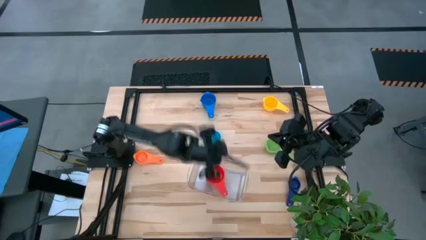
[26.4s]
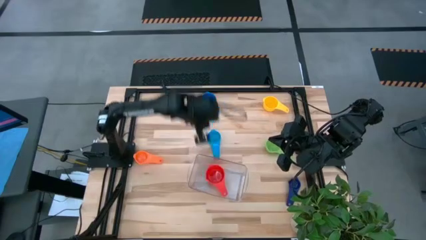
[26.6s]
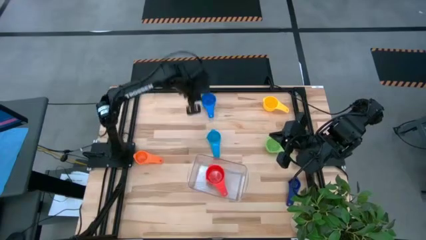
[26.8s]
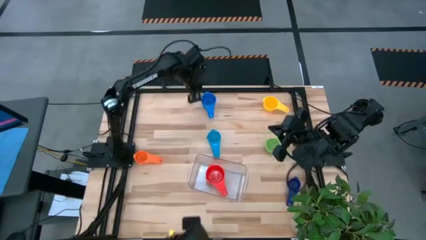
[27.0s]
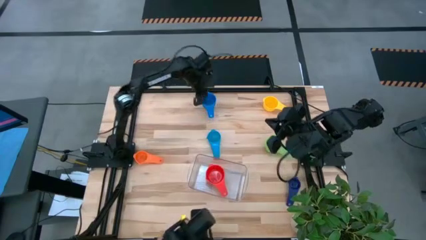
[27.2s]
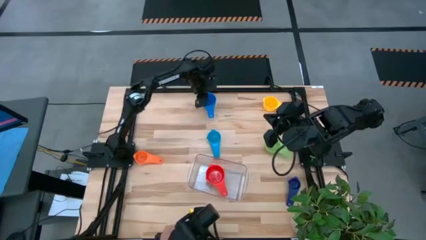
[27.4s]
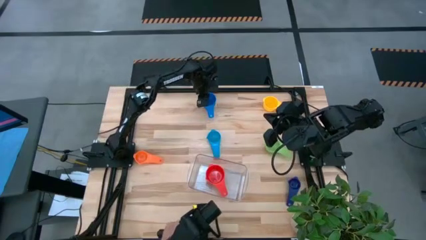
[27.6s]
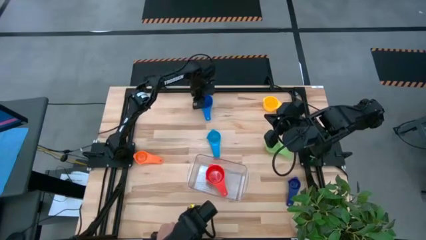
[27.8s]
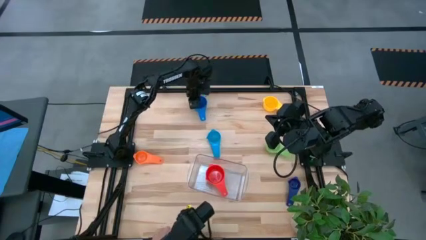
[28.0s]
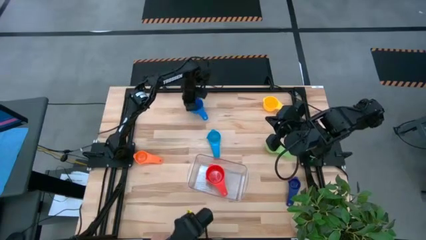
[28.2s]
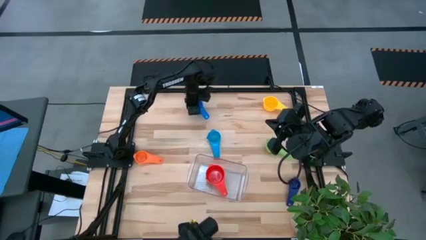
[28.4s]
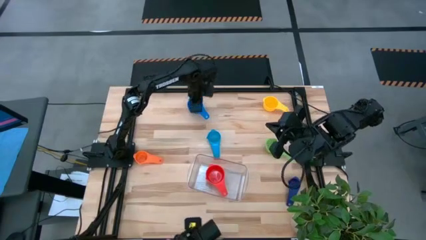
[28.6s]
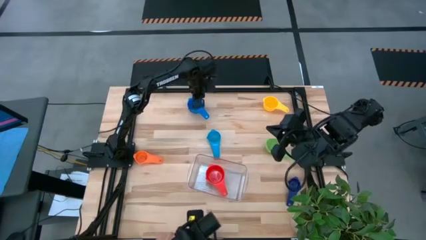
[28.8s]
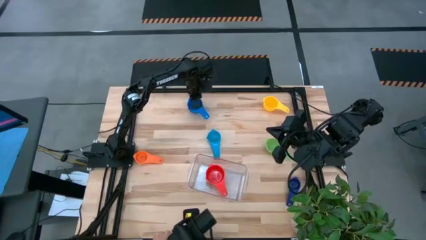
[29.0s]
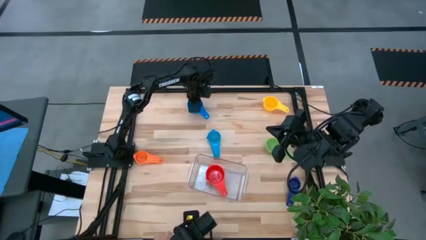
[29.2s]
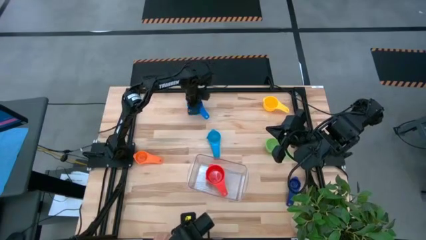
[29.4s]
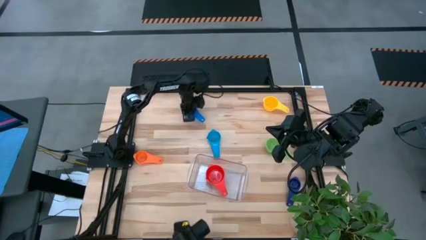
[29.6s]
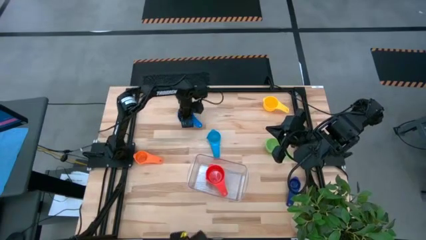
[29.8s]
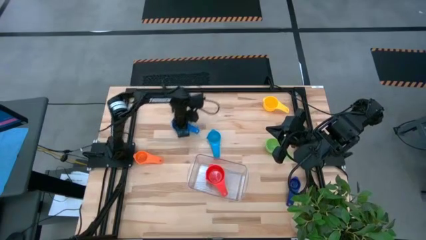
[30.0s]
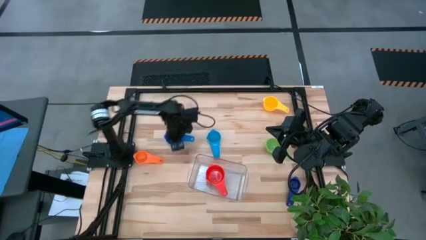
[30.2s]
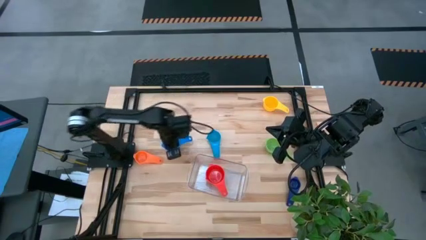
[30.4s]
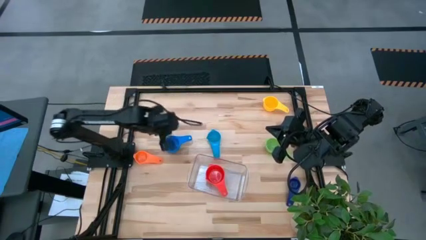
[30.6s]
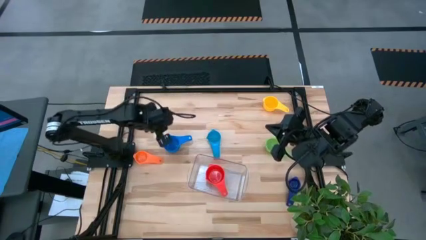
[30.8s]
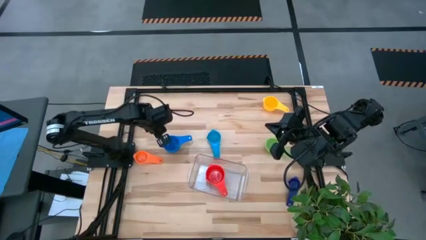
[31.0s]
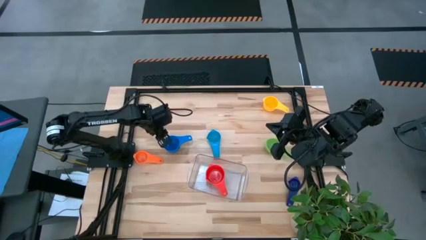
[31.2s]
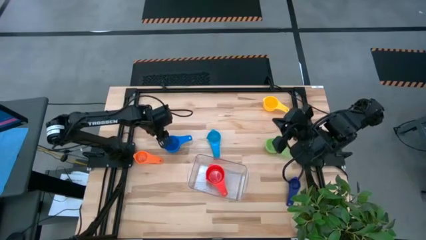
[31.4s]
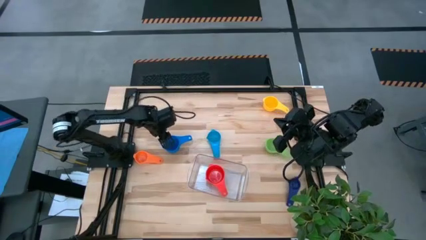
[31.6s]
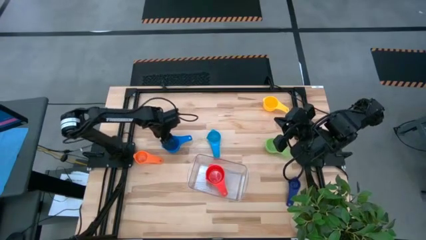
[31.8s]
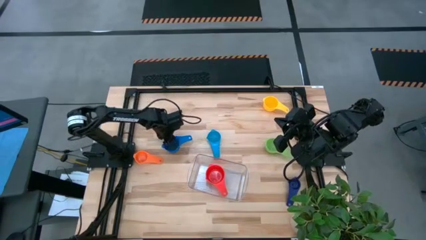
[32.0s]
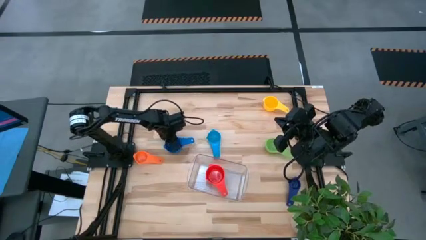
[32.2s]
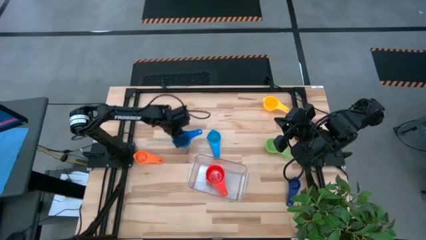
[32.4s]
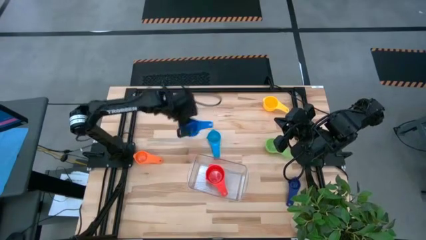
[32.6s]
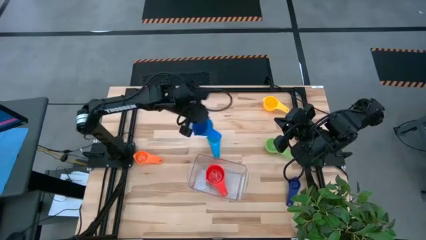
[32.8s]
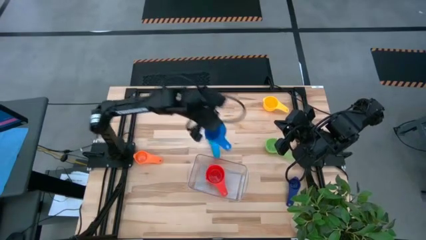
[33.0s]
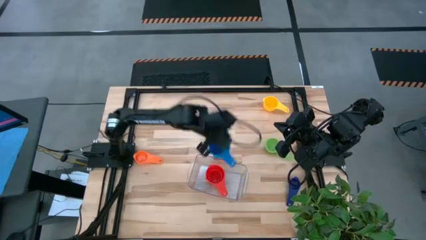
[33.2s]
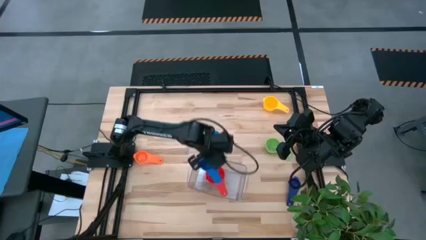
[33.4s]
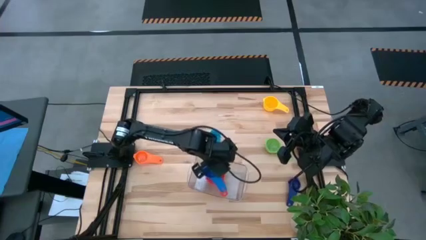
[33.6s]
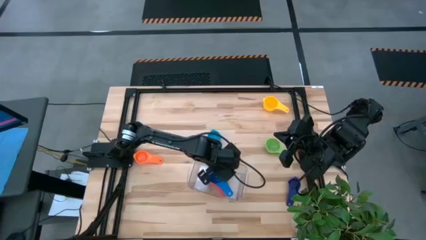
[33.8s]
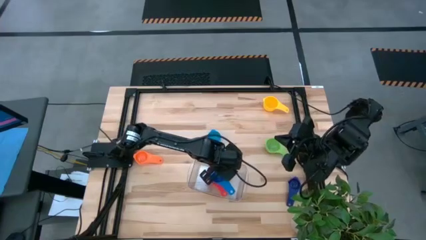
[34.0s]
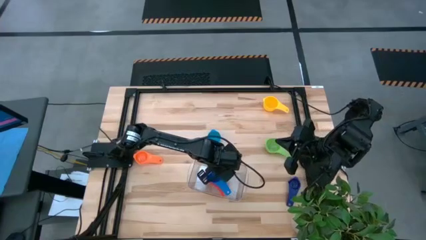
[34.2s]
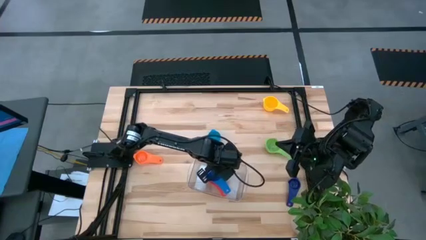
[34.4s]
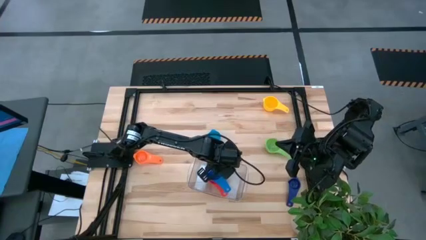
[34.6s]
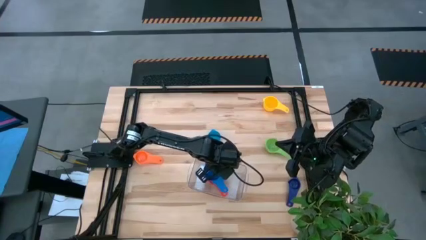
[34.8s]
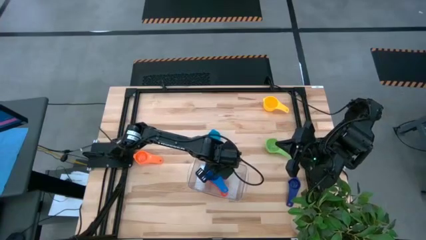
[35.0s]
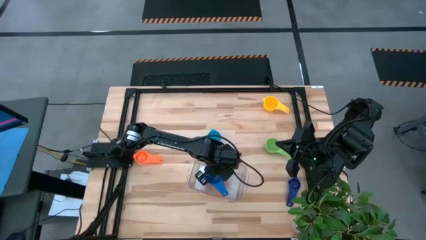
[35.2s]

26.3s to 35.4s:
Task: Nest measuring cups in basket
Stack the top light blue measuring cup on top of the red measuring cup into the transparent bin

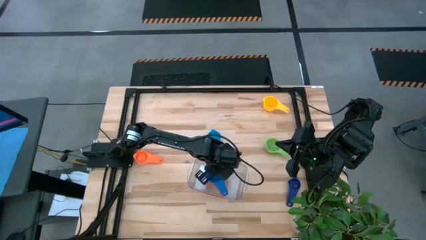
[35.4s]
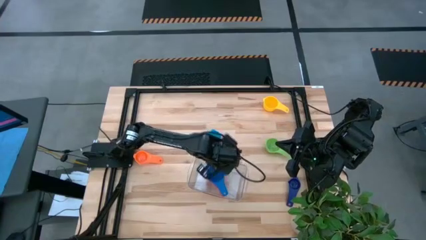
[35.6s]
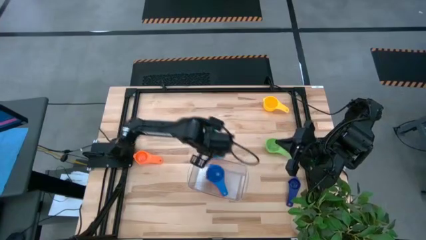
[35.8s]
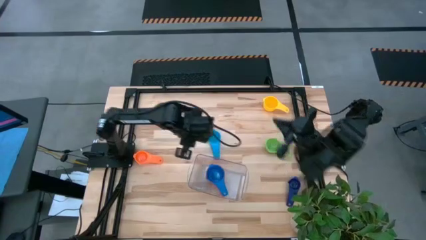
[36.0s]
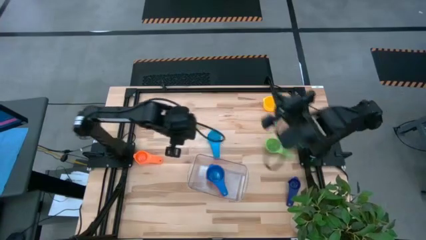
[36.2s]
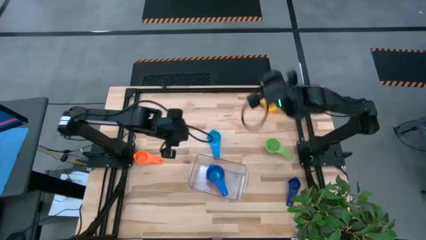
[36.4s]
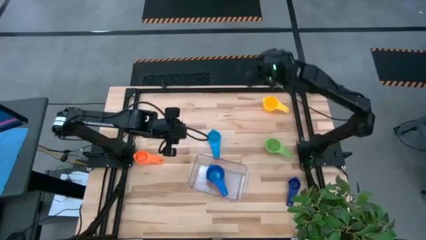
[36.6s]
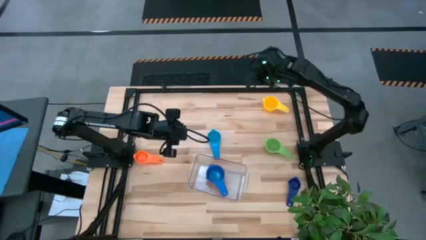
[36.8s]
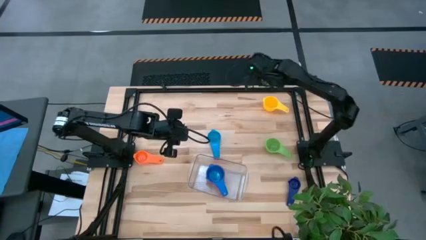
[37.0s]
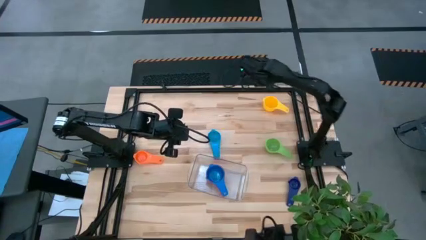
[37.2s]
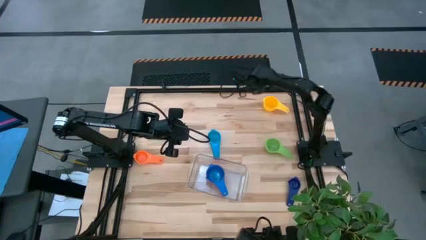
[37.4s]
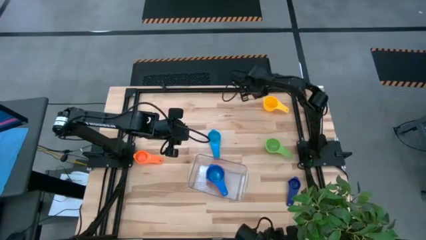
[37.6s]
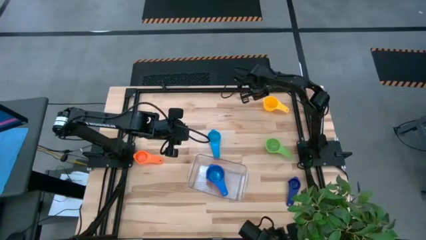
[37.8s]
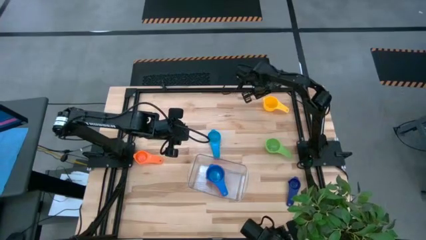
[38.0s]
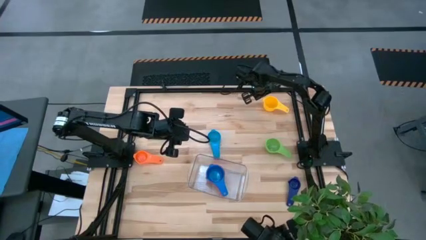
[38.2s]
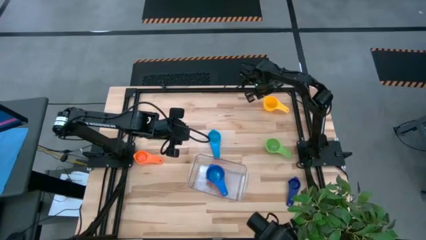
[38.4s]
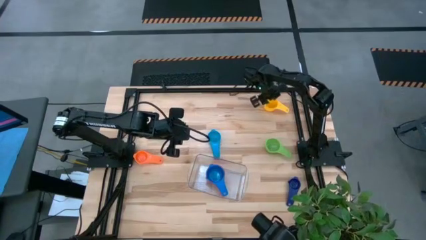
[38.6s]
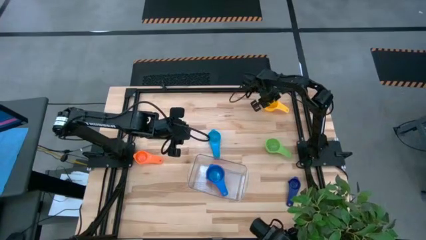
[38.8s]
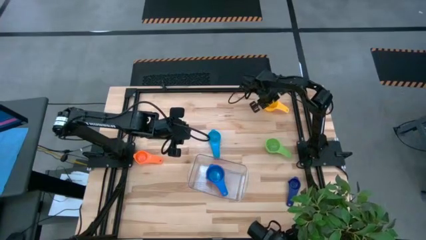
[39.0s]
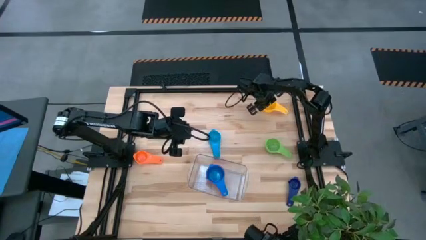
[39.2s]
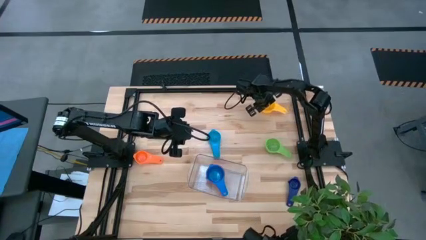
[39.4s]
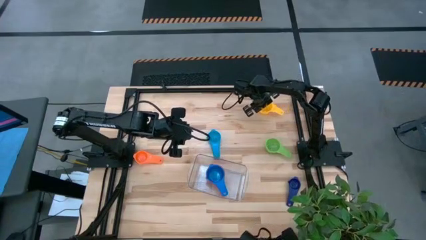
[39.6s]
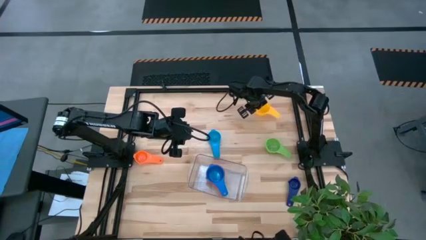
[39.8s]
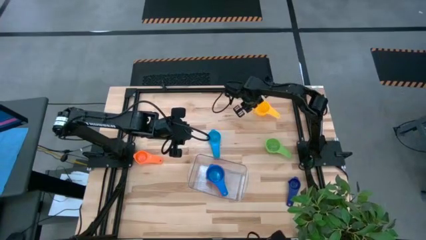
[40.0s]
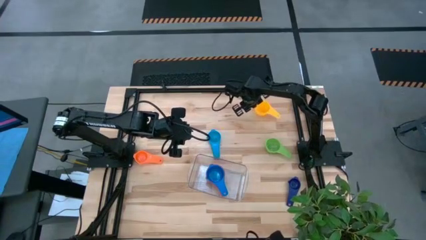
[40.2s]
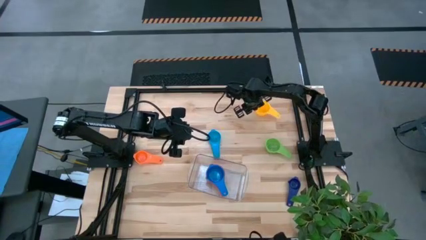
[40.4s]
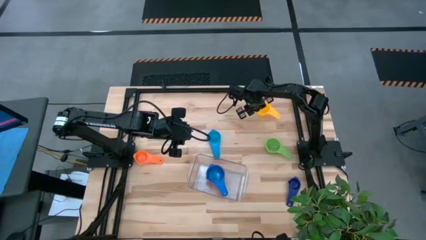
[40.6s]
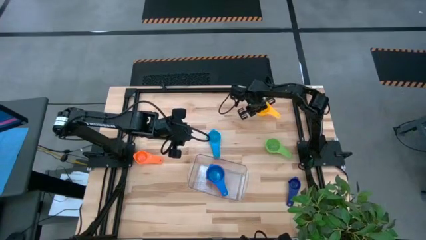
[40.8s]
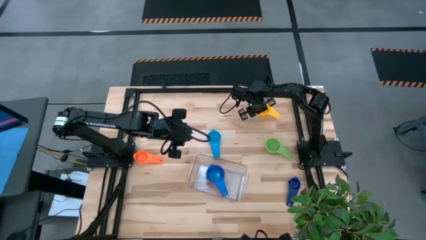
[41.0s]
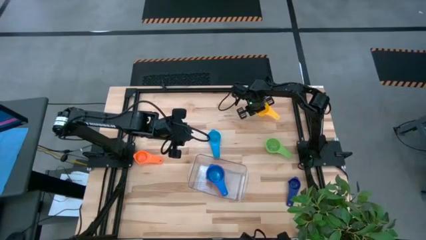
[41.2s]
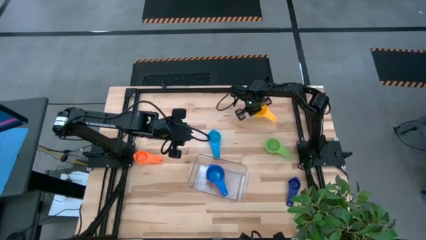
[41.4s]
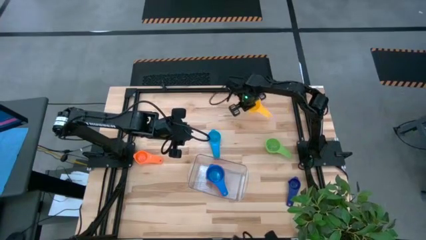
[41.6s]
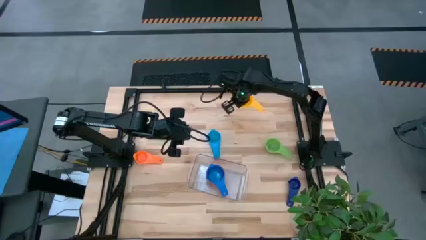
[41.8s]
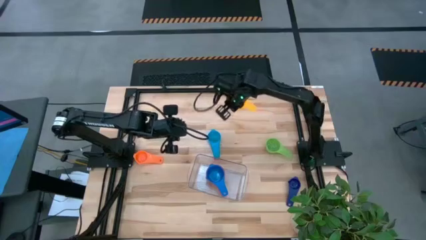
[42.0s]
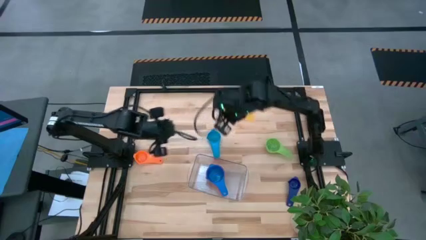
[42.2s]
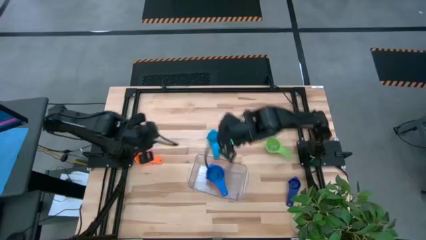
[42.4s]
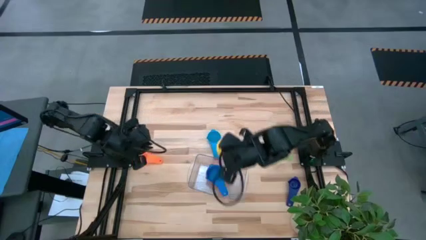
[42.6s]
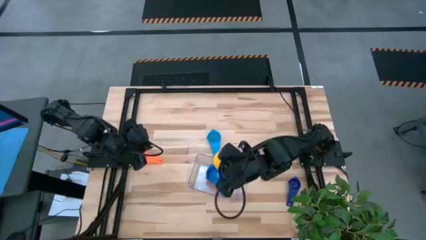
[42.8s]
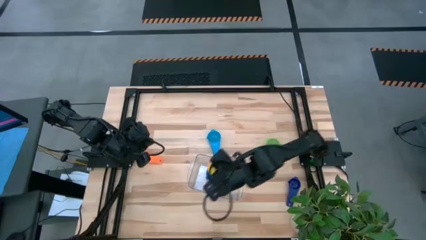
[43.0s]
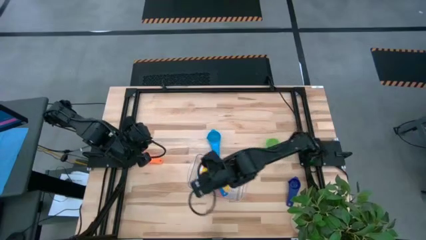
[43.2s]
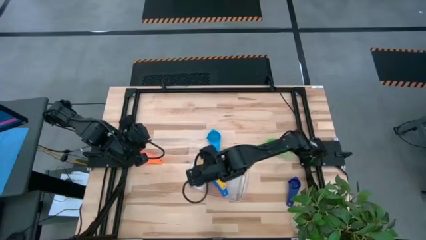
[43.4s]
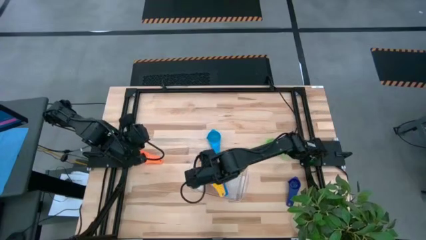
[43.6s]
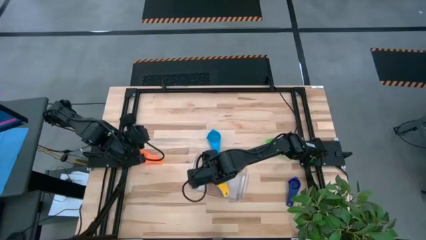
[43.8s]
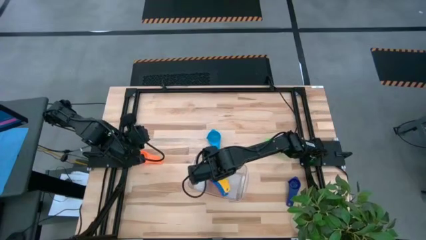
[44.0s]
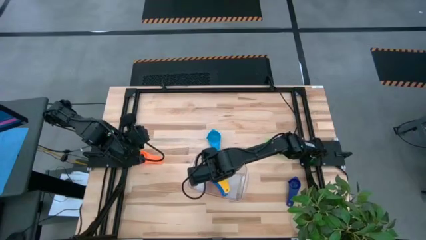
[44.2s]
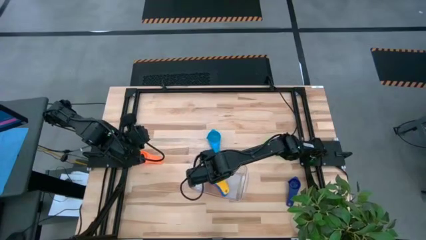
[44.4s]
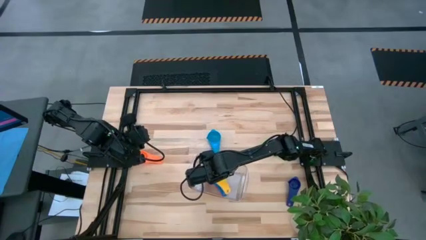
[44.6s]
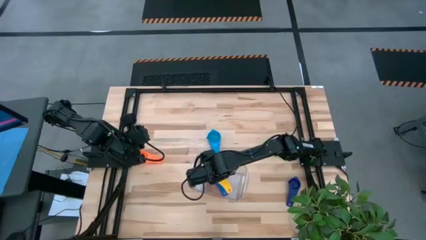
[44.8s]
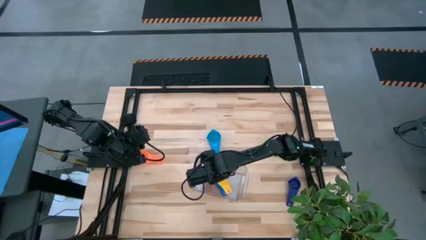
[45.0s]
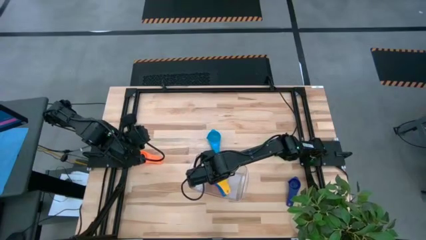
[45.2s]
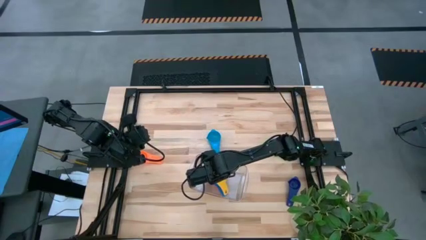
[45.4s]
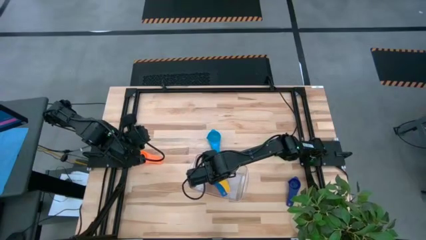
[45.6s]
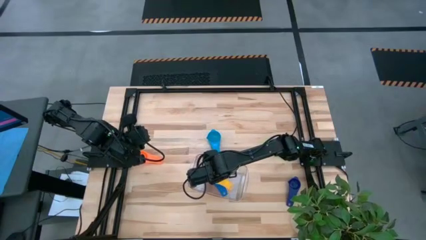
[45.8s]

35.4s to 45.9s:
Stack the yellow measuring cup on top of the light blue measuring cup into the transparent bin
